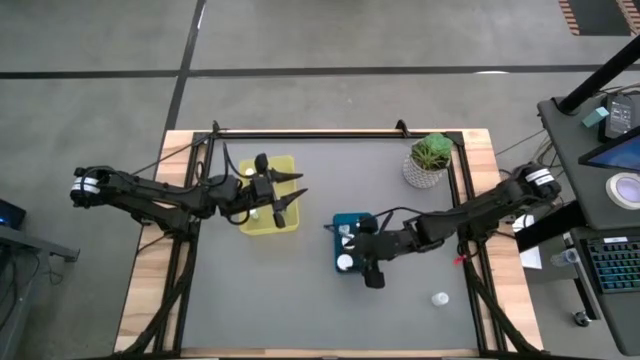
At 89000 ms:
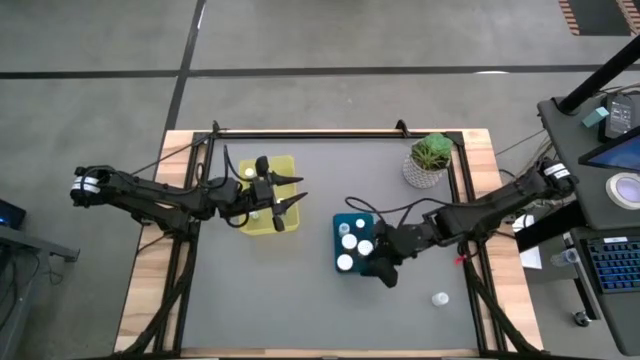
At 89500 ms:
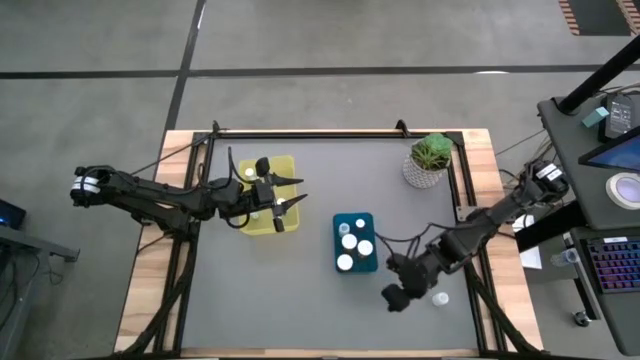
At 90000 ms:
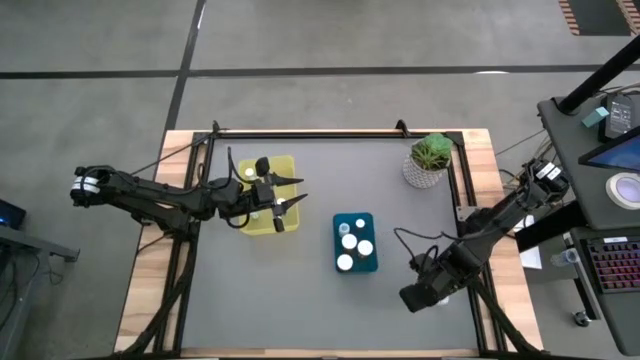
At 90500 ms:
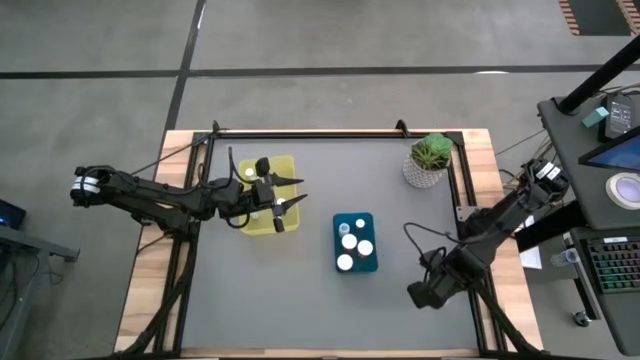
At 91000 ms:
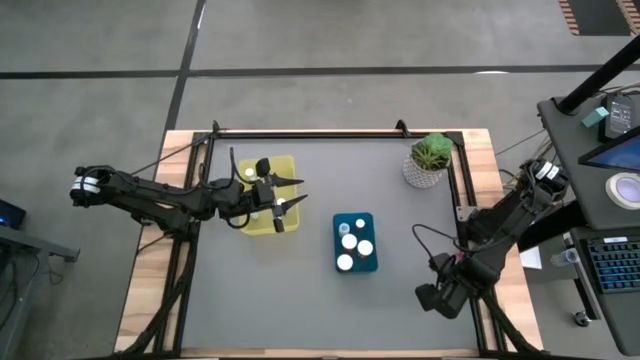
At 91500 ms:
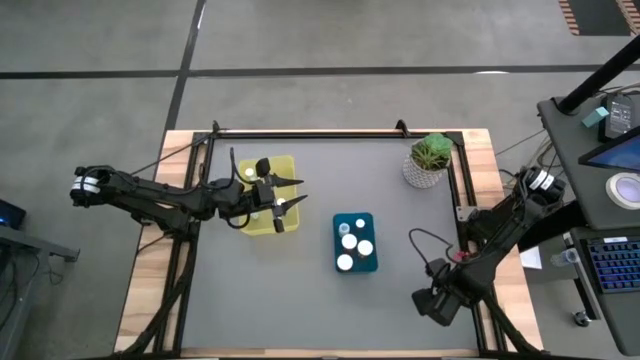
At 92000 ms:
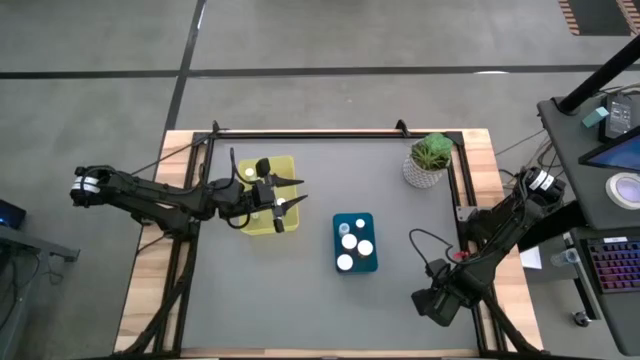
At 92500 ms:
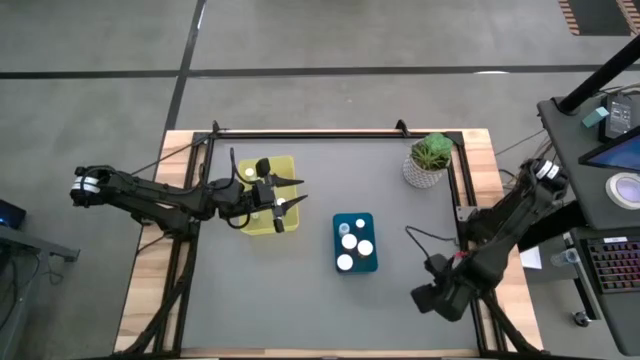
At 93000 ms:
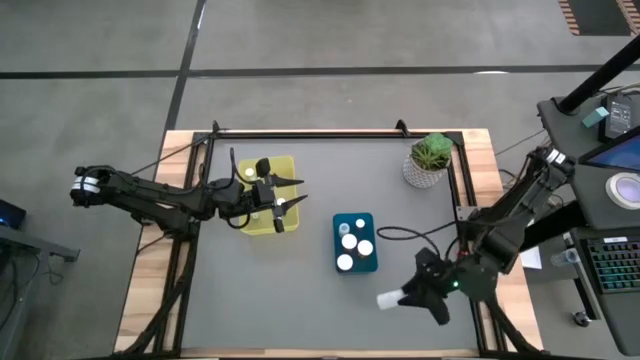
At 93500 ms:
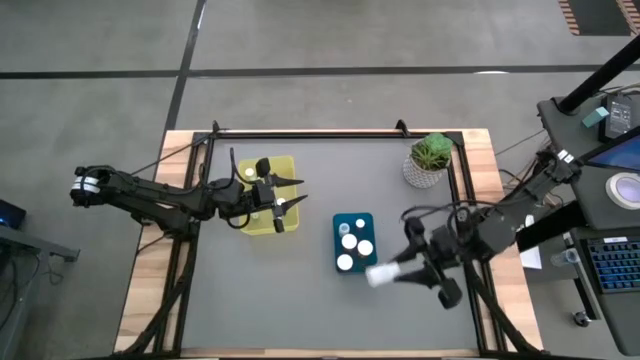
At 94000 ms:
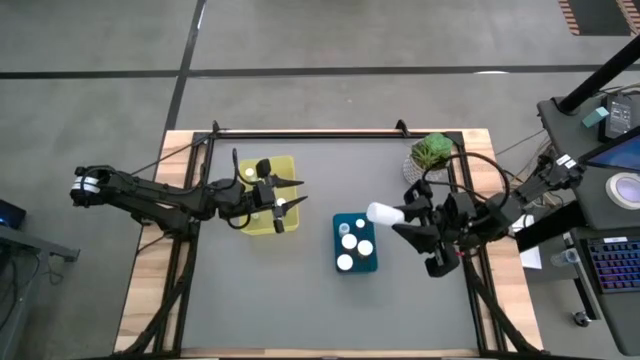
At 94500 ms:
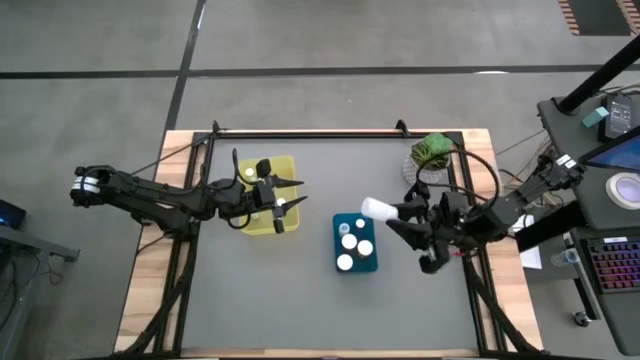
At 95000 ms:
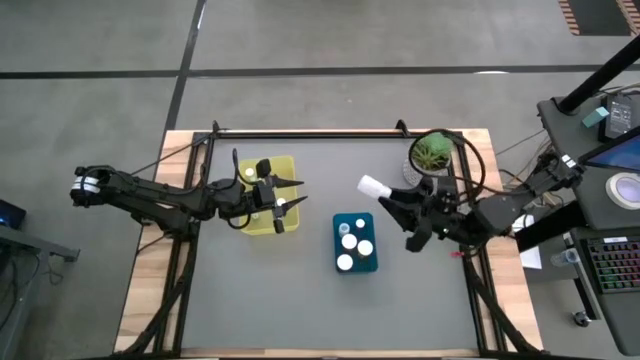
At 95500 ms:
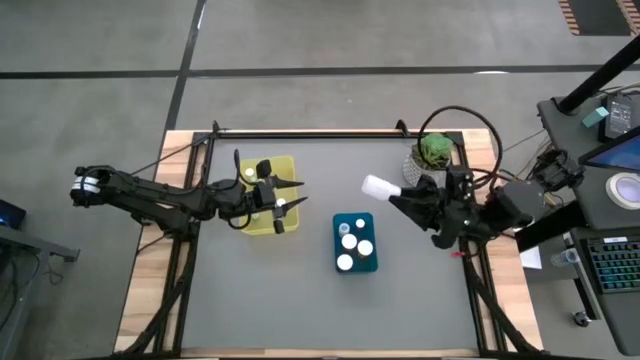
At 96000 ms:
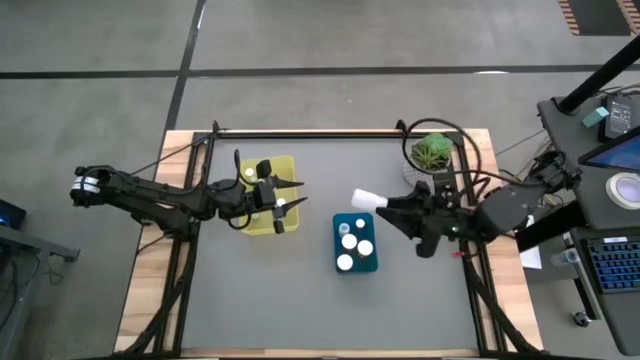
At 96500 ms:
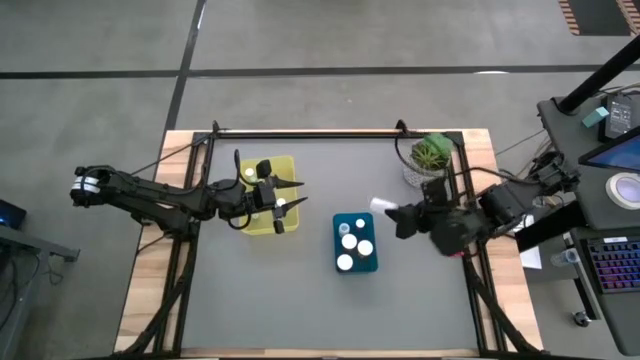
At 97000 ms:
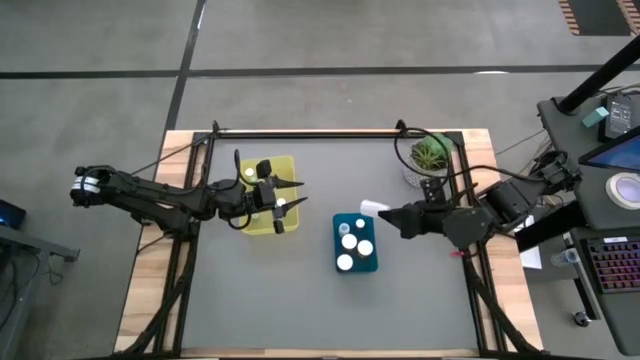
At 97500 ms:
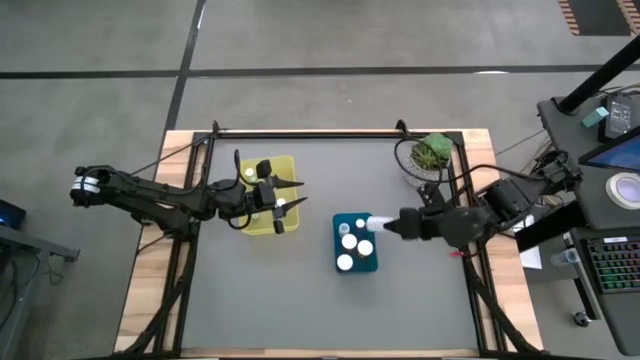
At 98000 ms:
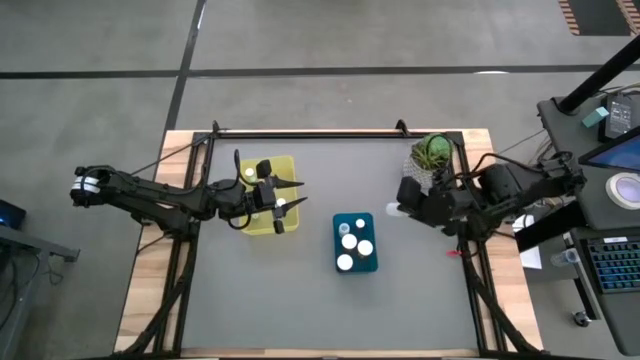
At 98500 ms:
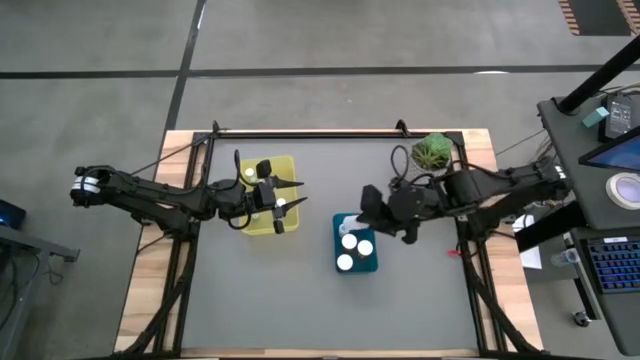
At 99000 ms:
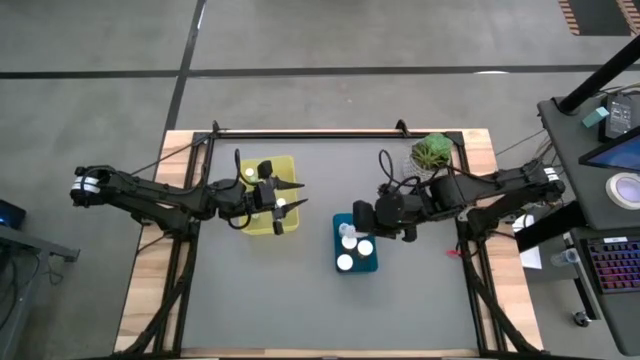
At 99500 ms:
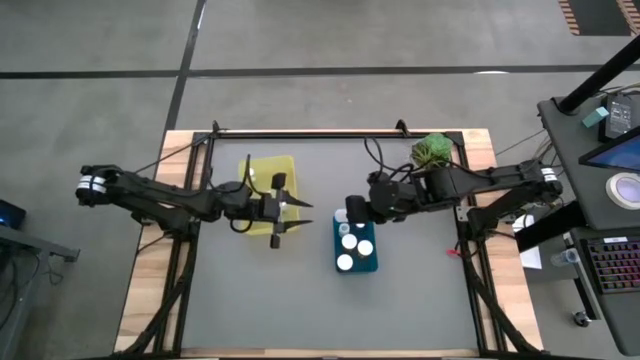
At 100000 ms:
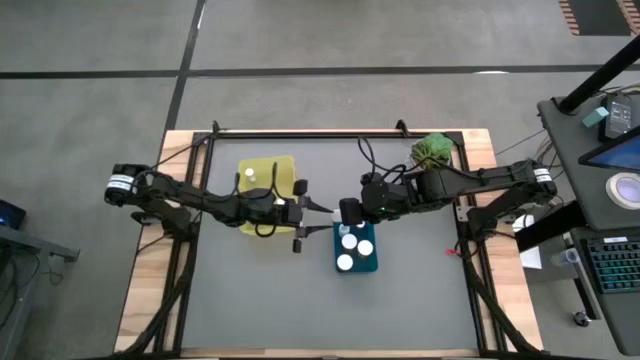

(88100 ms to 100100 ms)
Task: Pick and place medicine bottles into bin by pill shape (circle, oval)
Put the white tablet bottle into the yellow bin

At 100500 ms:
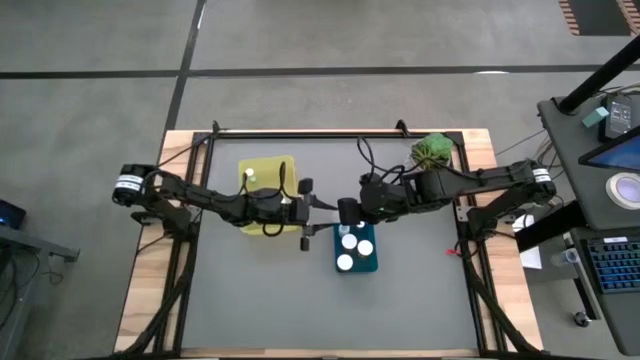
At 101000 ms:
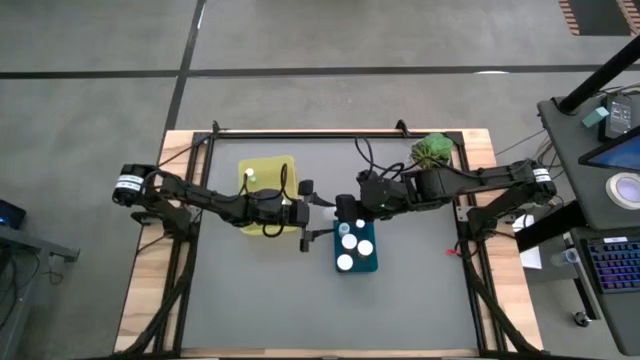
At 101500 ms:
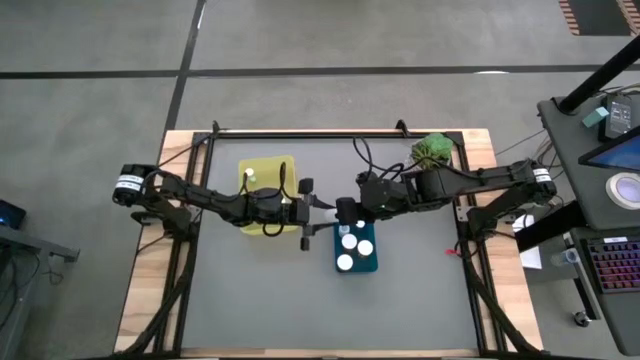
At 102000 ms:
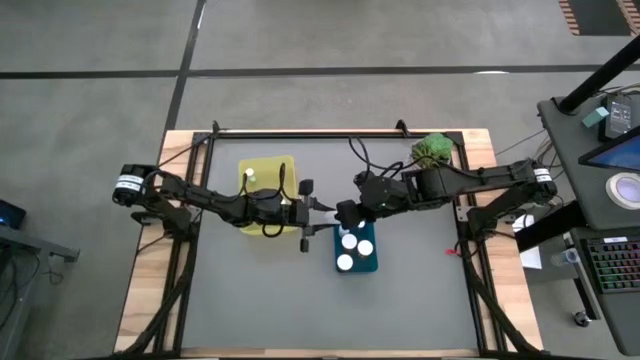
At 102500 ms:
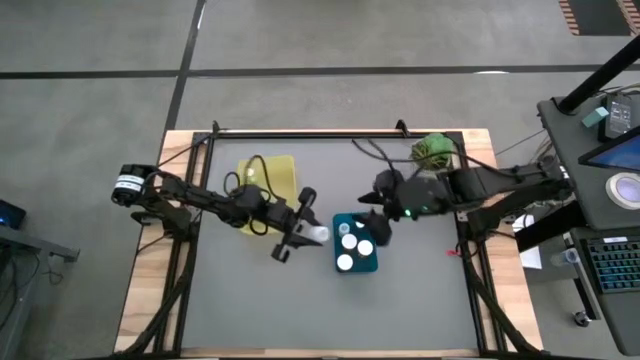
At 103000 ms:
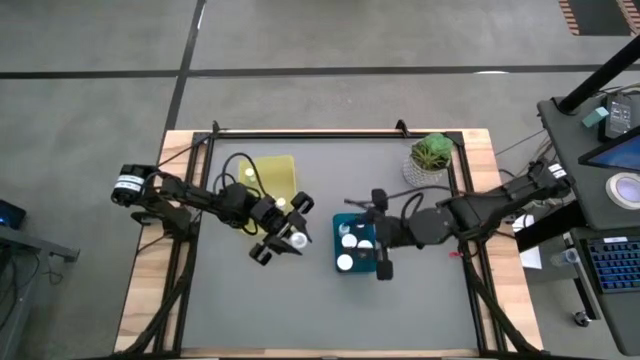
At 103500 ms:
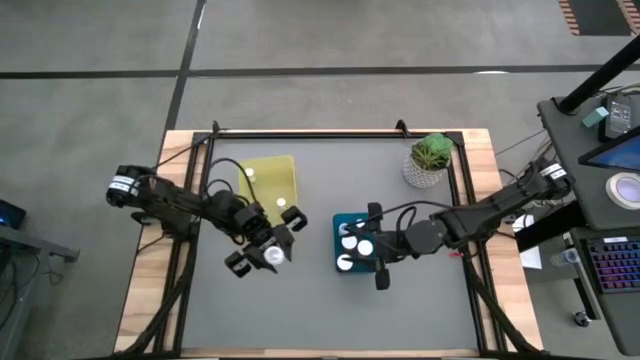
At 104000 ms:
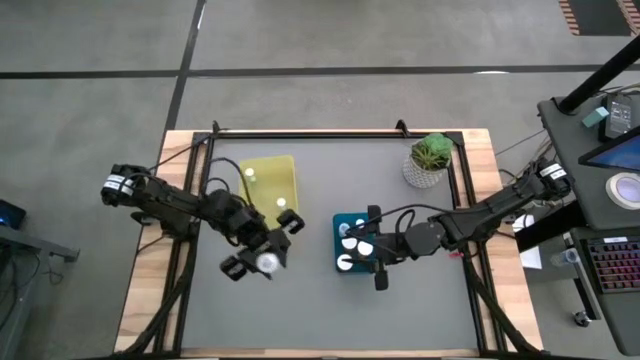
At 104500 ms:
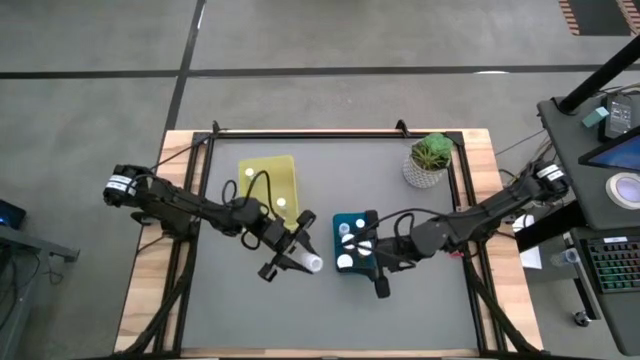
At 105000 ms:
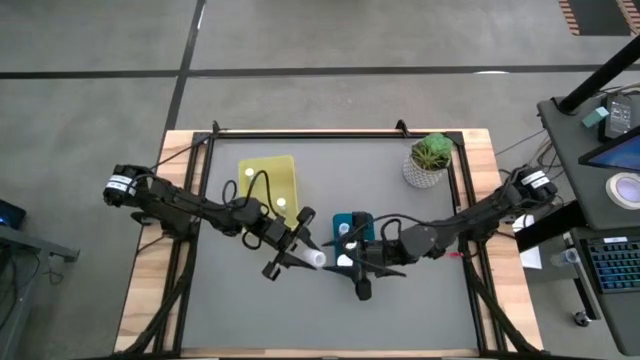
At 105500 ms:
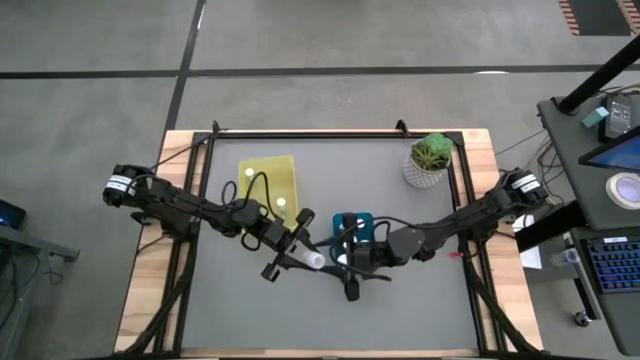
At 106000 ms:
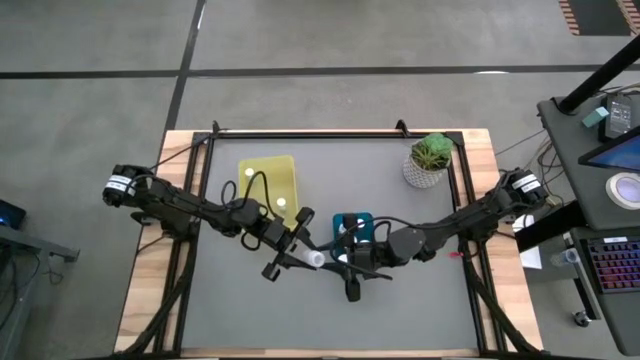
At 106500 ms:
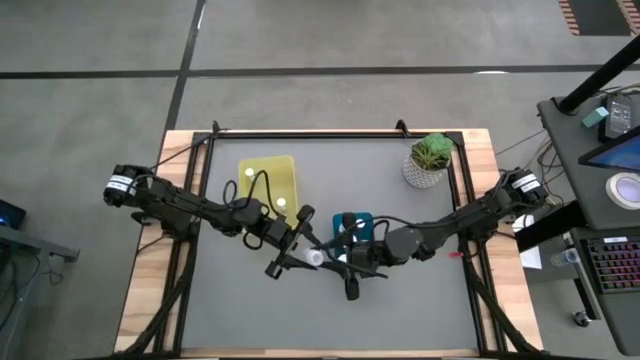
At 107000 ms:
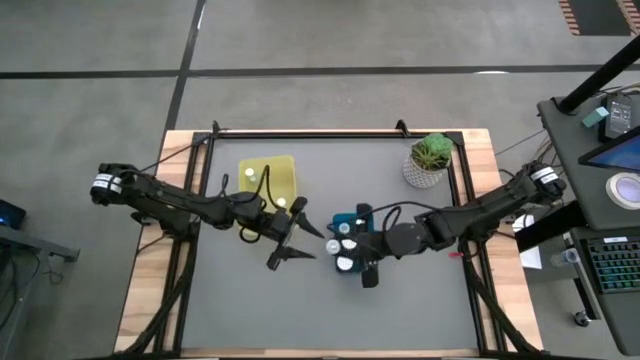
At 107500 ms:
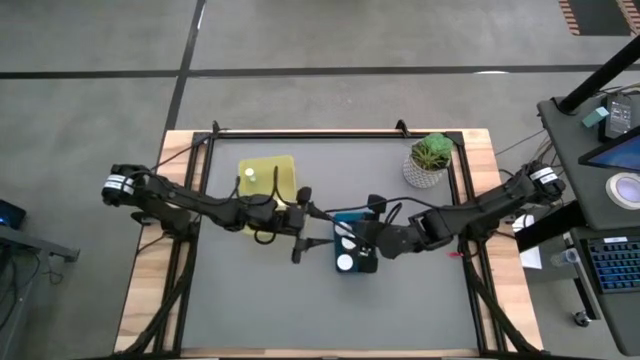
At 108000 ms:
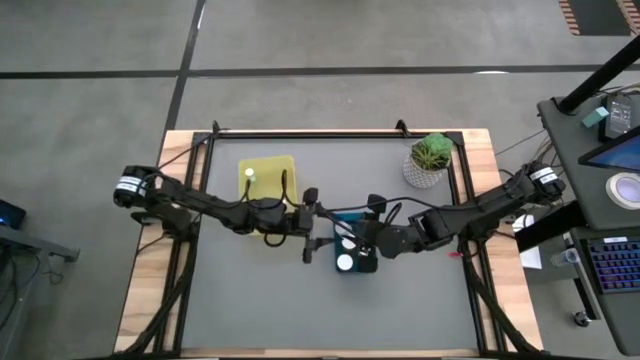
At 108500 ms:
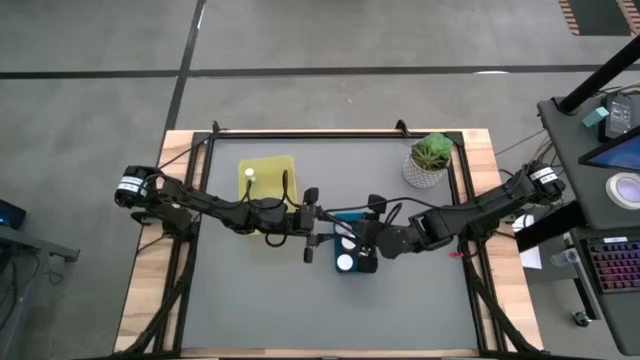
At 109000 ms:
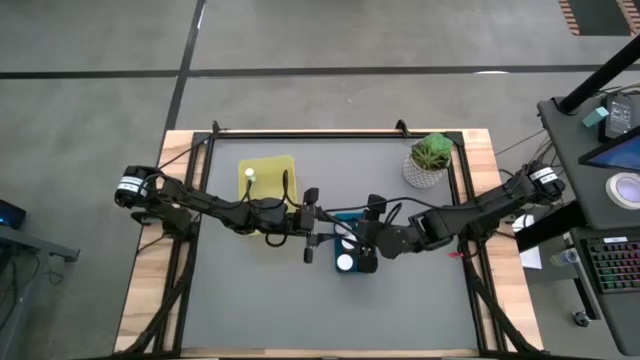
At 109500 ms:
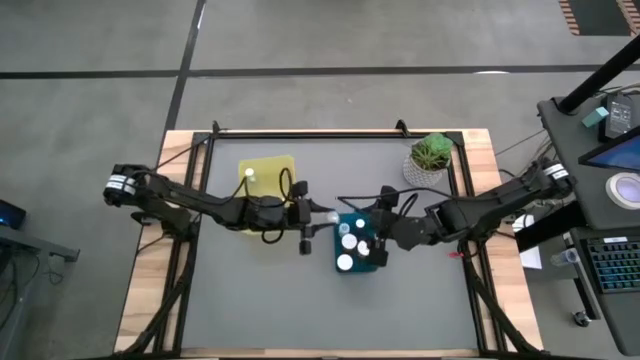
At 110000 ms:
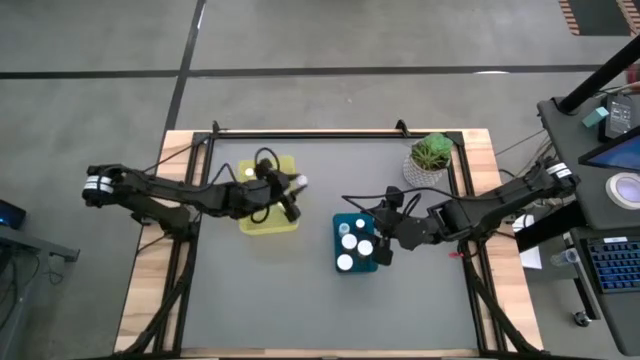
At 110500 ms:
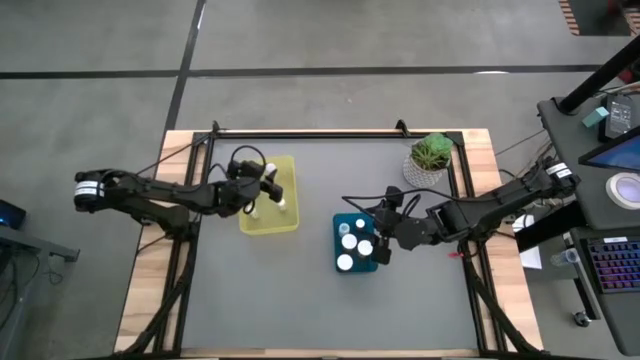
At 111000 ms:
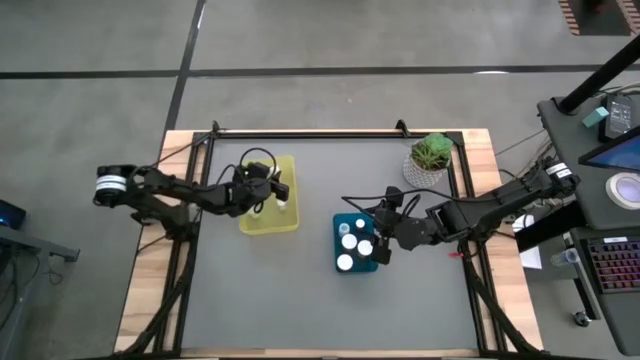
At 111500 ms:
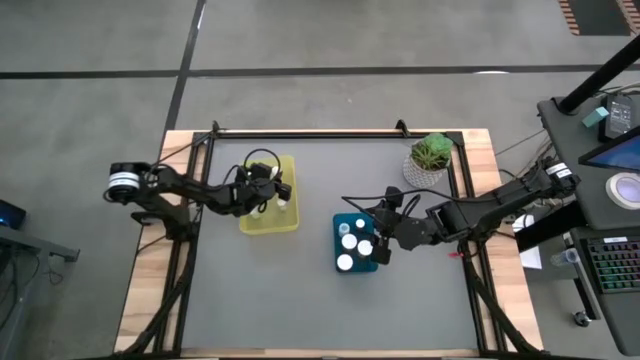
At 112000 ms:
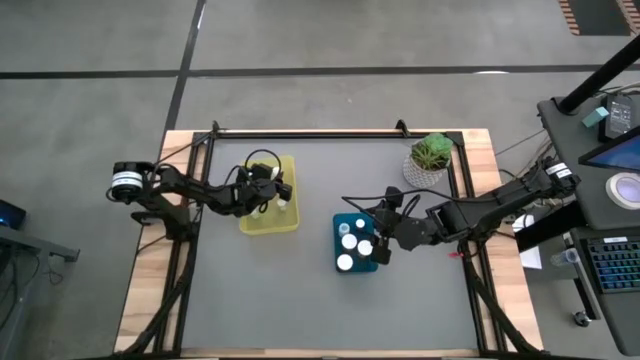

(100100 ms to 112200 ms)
Put the white tablet bottle into the yellow bin
